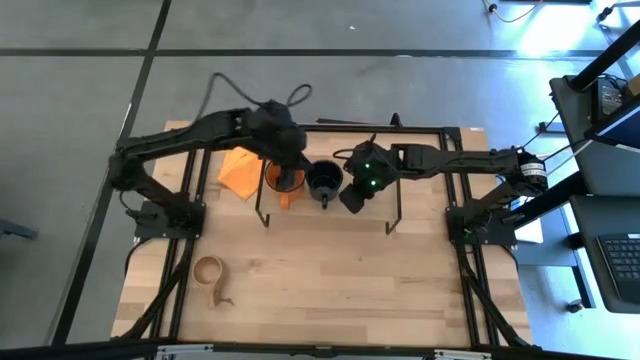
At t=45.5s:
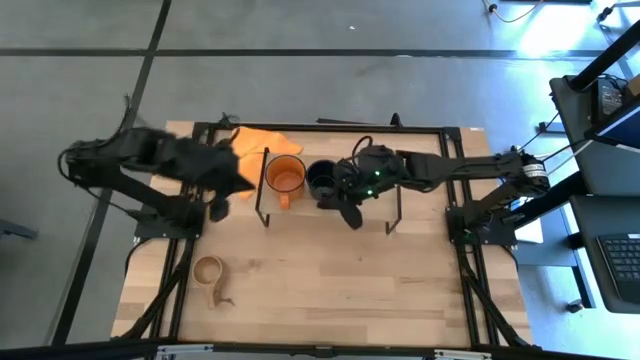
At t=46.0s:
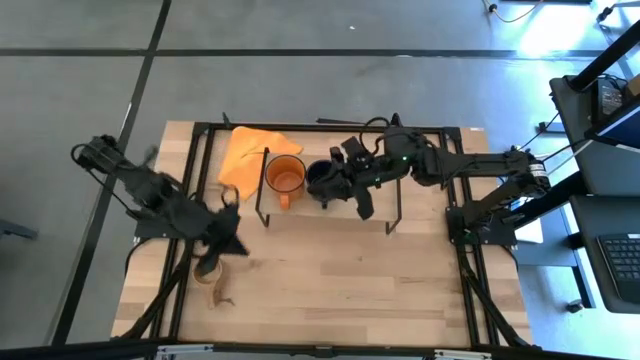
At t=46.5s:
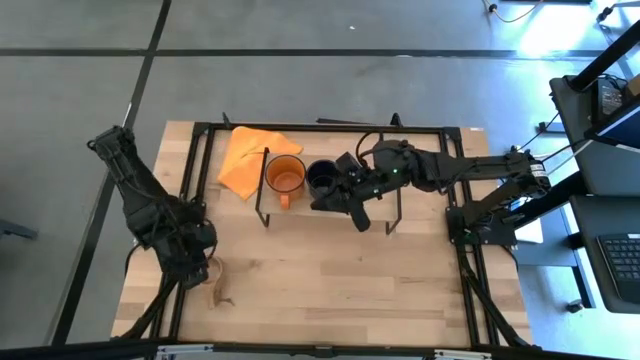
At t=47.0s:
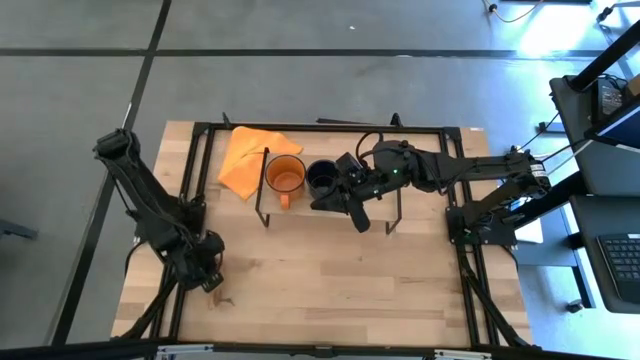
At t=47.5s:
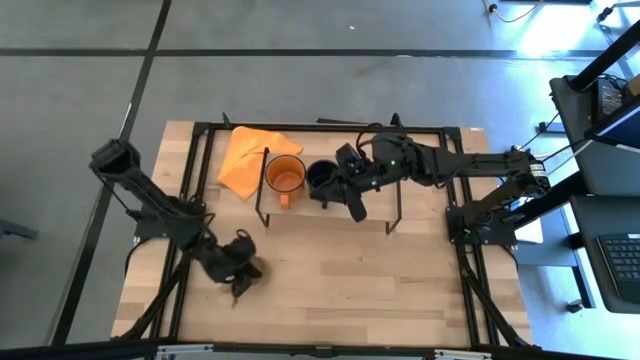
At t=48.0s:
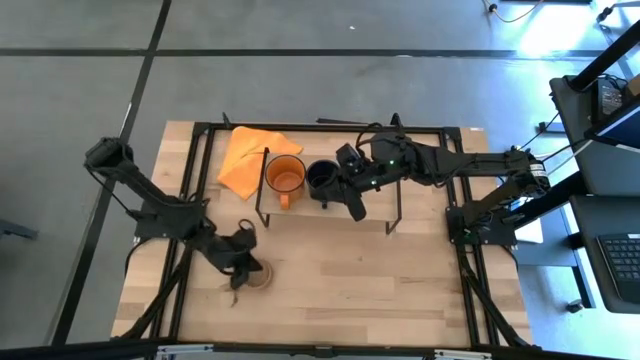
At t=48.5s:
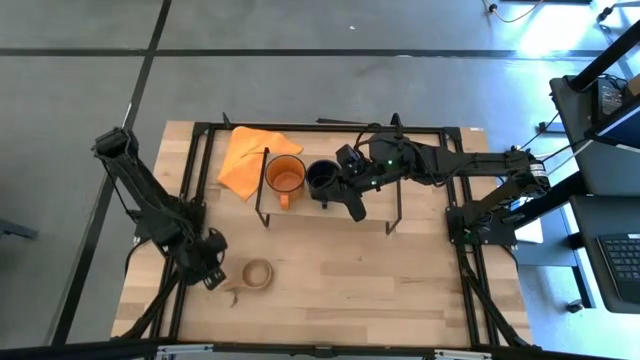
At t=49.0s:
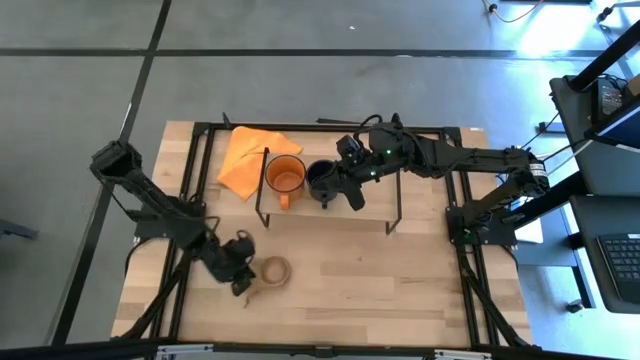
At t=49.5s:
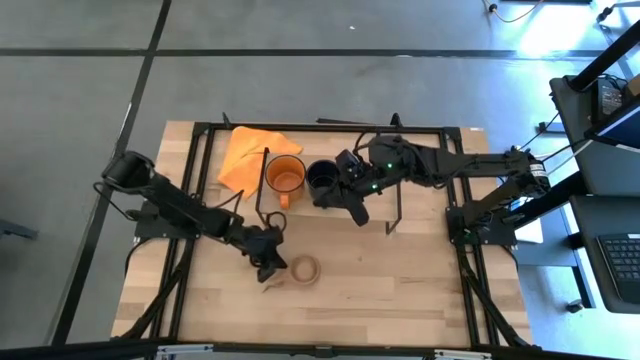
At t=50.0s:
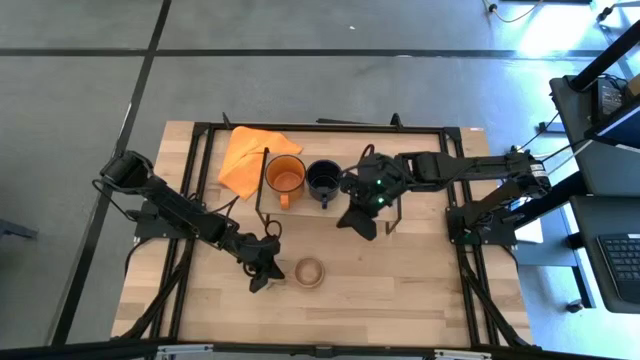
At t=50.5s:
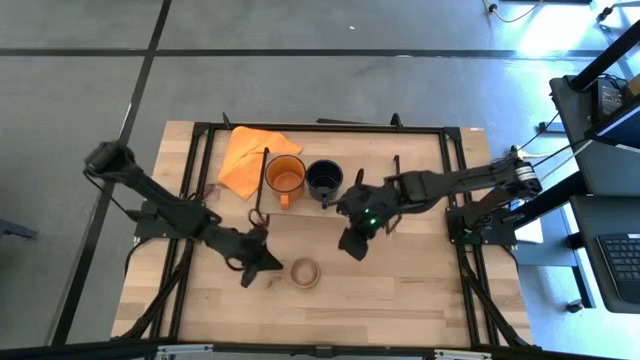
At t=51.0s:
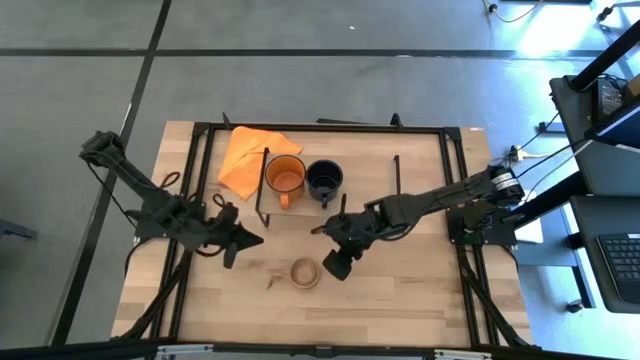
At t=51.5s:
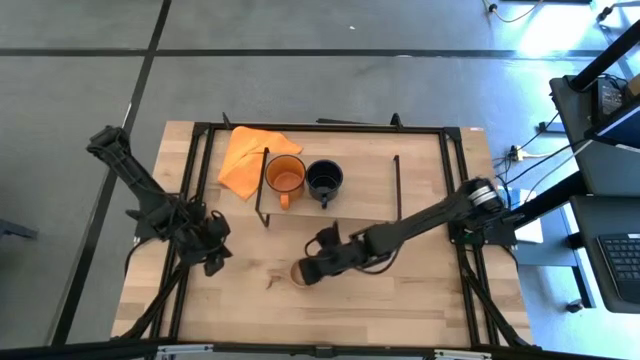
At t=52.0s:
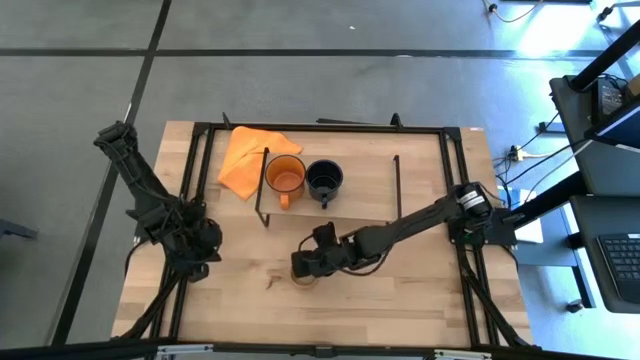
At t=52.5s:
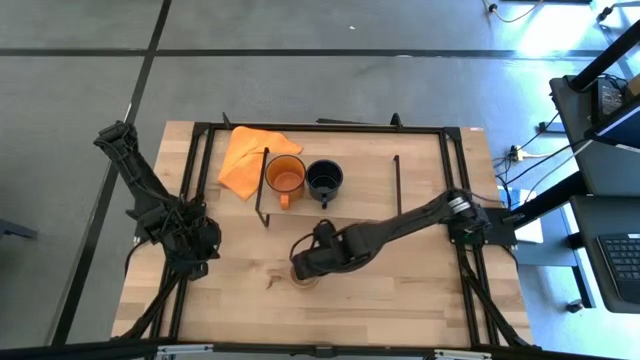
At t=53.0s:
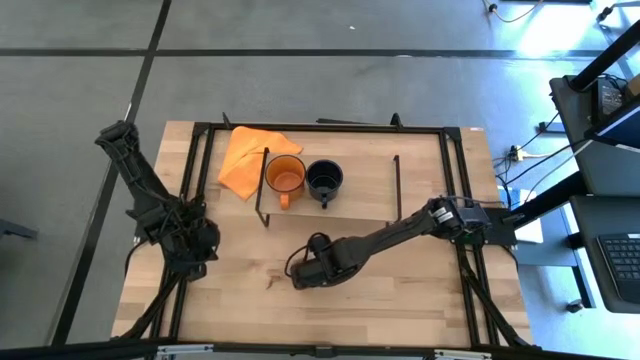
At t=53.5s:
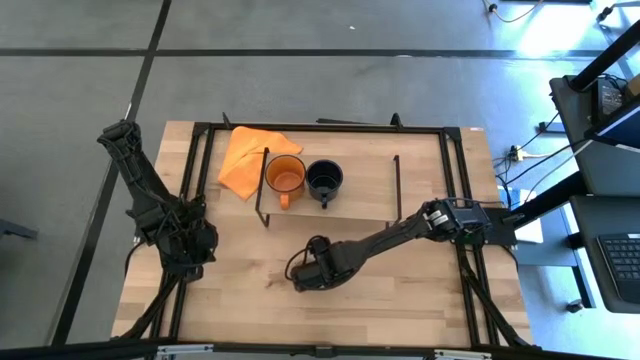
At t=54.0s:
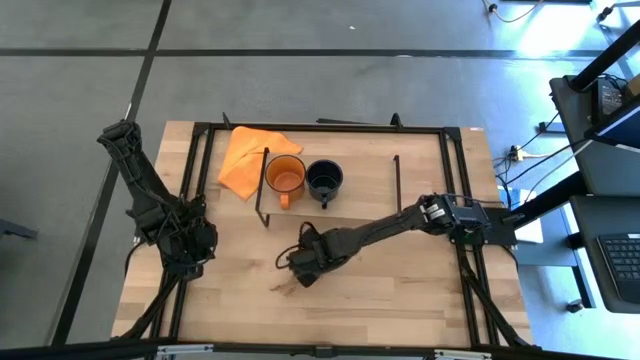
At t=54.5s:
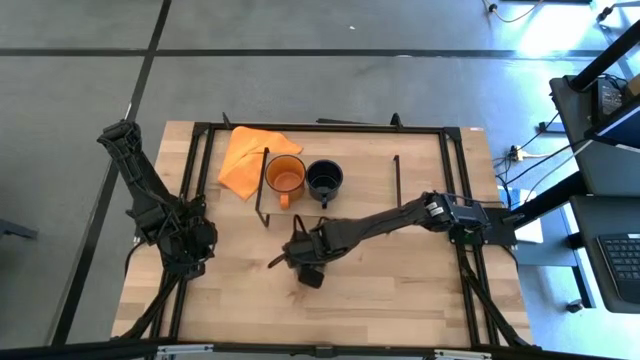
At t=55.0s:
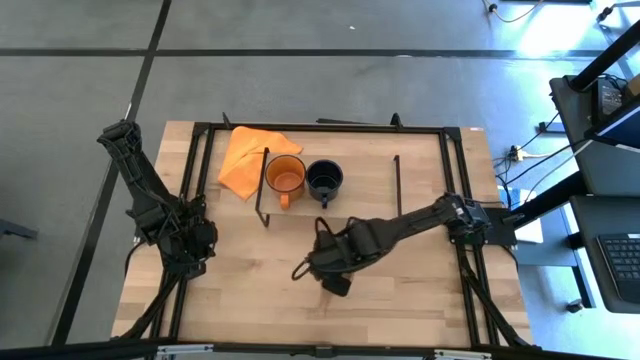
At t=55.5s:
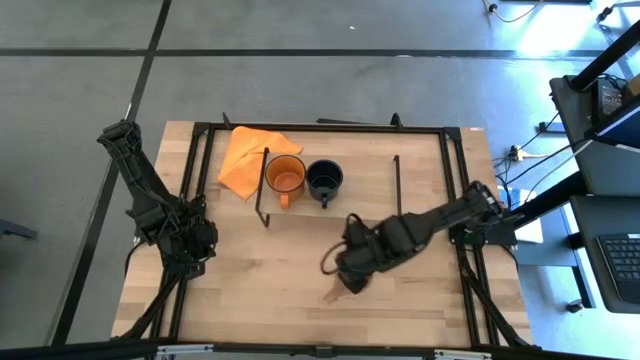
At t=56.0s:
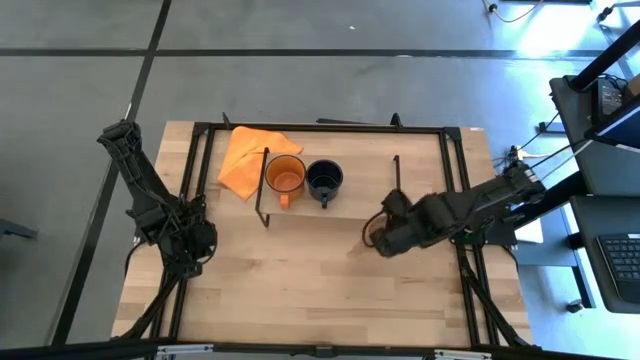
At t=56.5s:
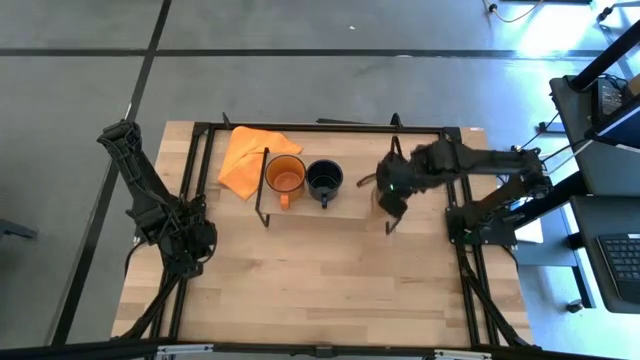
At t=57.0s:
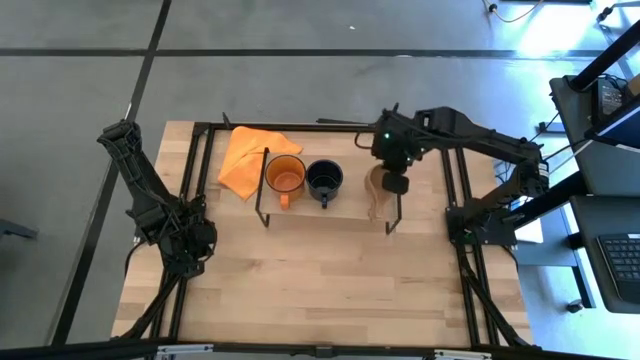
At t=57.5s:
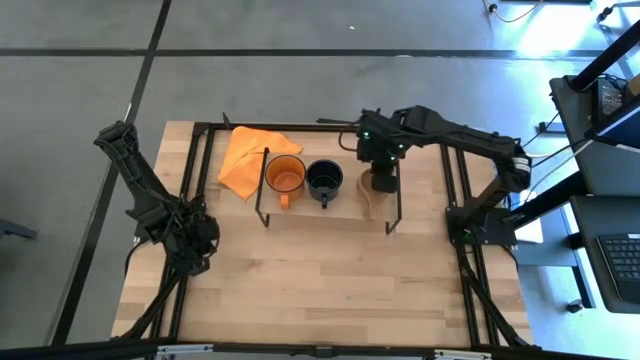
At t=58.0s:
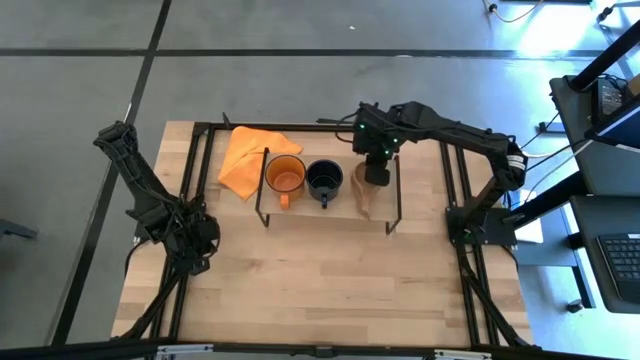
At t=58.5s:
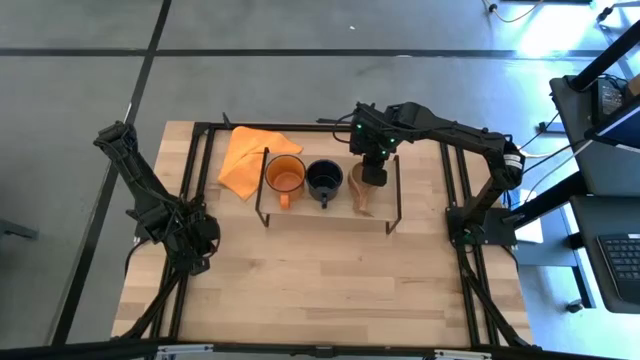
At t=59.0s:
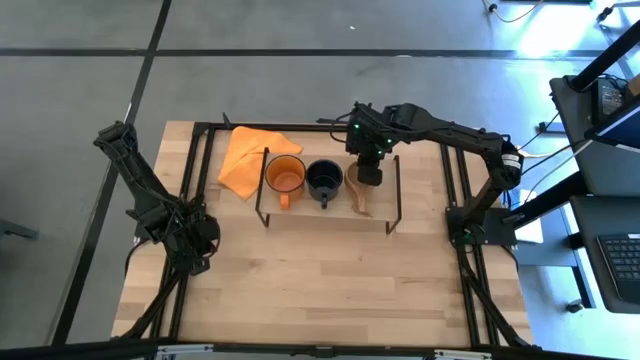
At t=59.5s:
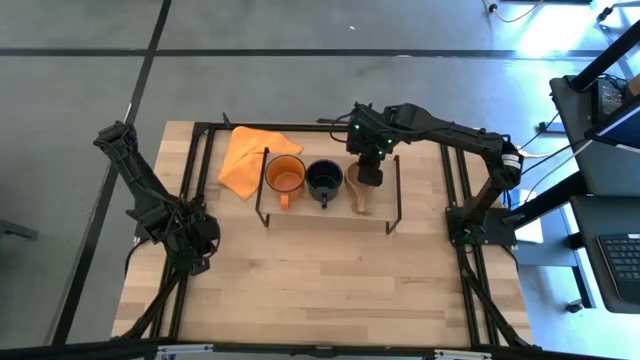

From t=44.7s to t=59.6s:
Task: Stack small to large cups/mugs on shelf
Put the brown wooden mug onto the shelf
